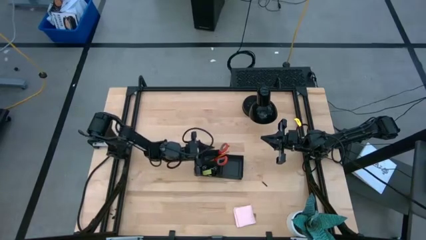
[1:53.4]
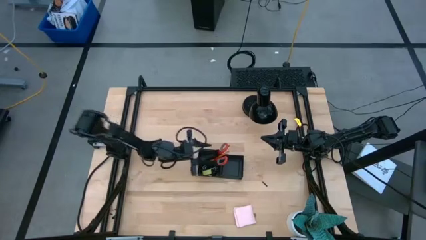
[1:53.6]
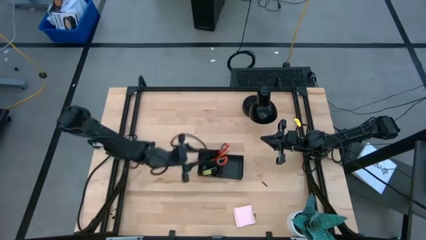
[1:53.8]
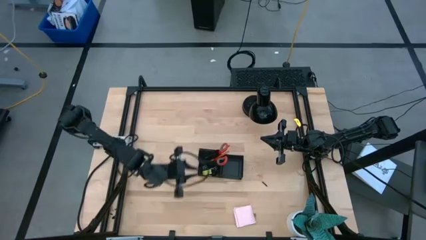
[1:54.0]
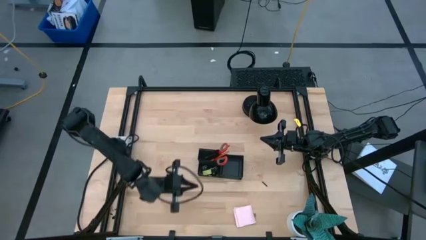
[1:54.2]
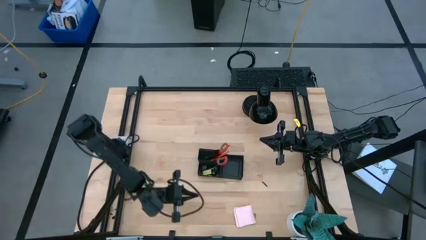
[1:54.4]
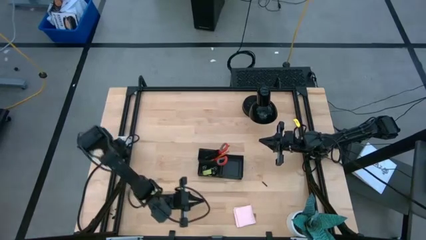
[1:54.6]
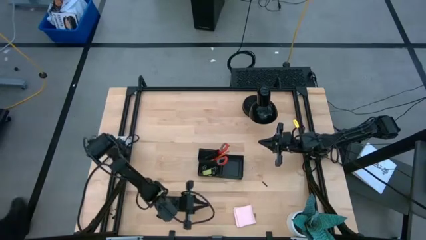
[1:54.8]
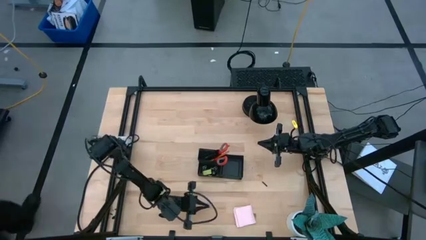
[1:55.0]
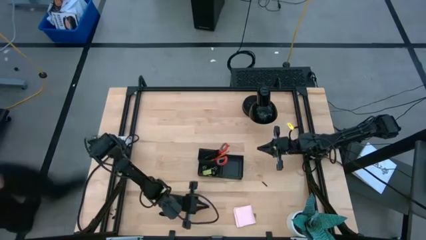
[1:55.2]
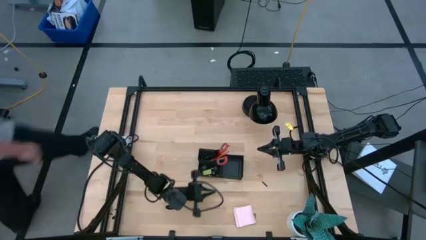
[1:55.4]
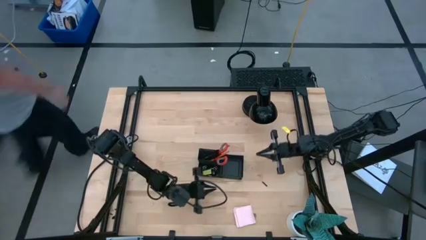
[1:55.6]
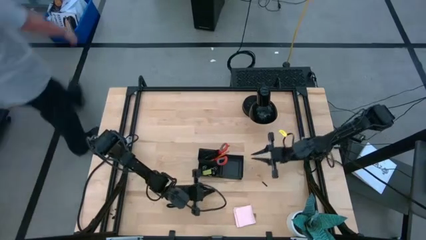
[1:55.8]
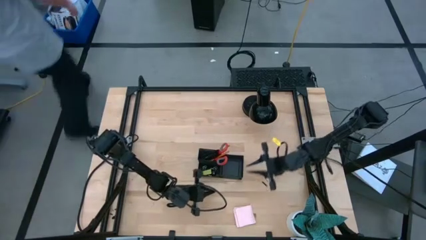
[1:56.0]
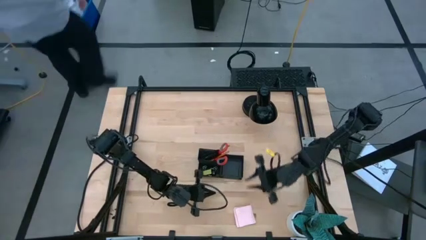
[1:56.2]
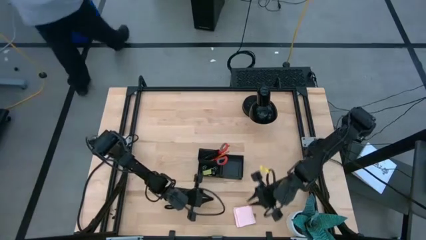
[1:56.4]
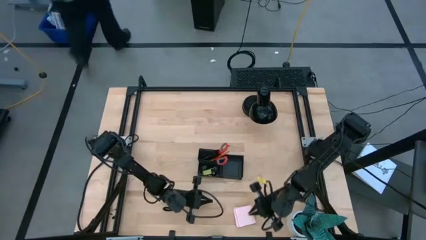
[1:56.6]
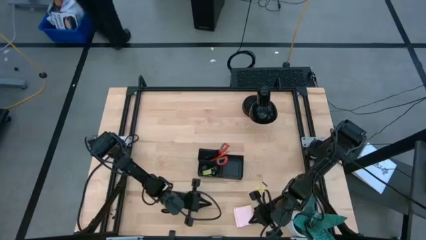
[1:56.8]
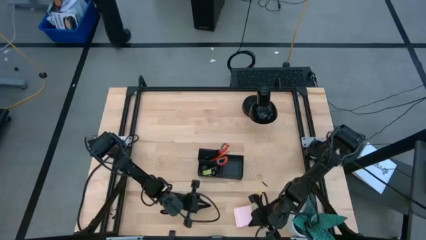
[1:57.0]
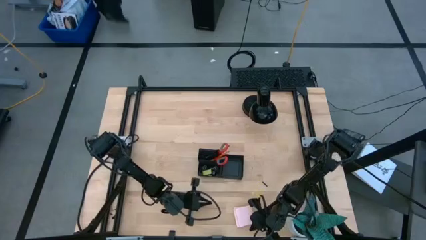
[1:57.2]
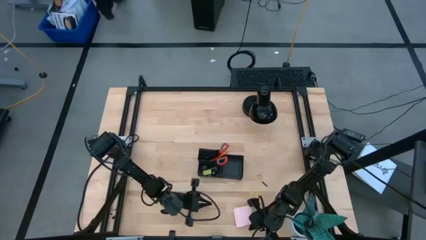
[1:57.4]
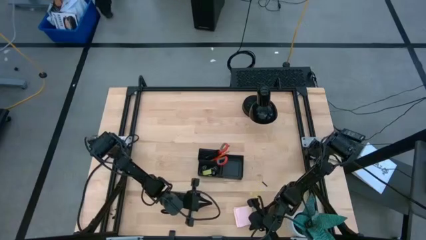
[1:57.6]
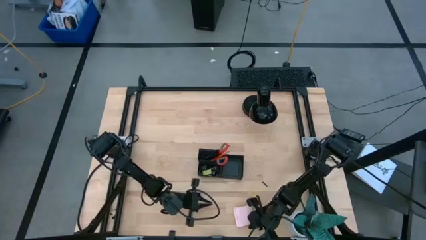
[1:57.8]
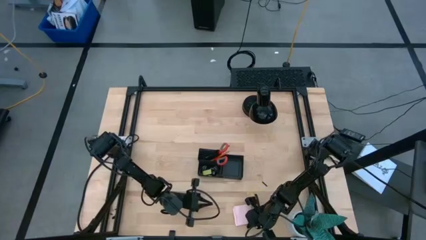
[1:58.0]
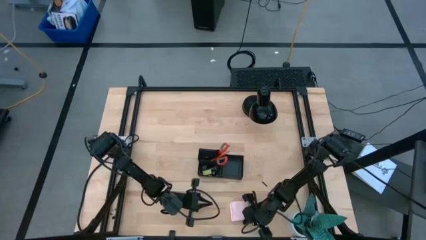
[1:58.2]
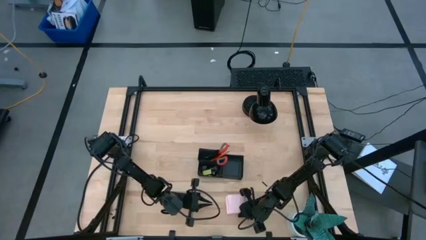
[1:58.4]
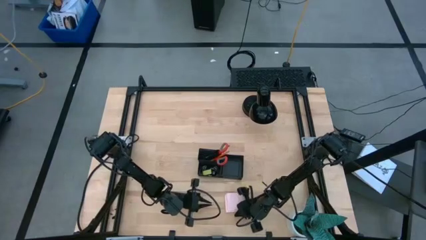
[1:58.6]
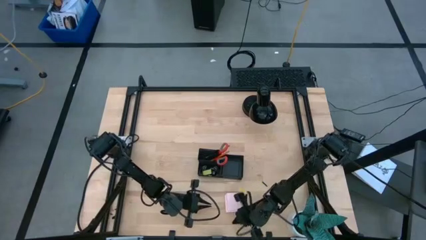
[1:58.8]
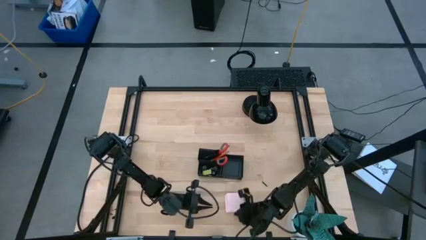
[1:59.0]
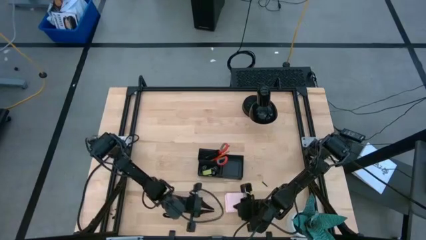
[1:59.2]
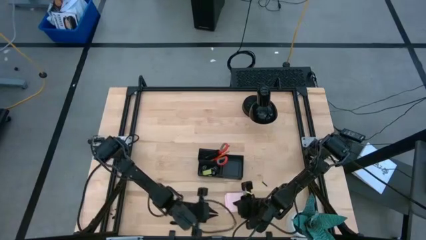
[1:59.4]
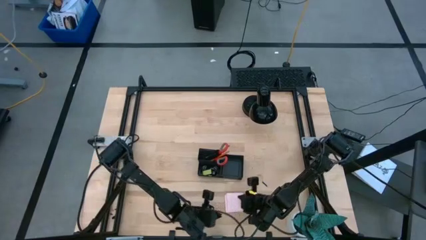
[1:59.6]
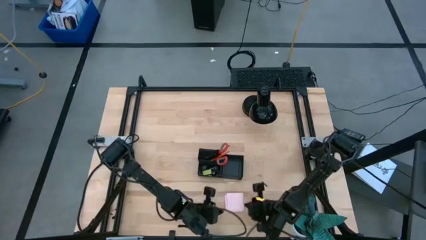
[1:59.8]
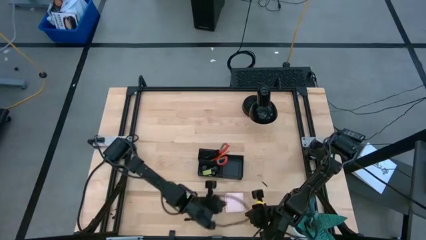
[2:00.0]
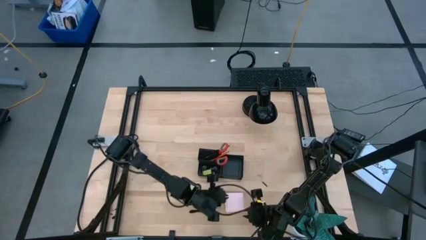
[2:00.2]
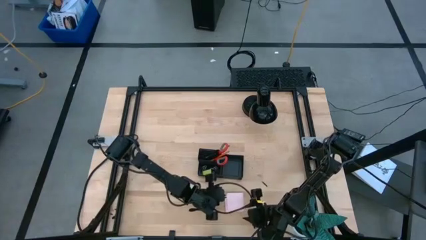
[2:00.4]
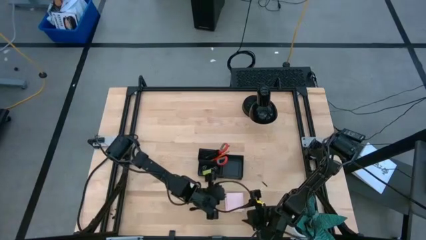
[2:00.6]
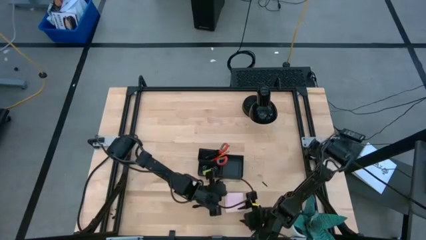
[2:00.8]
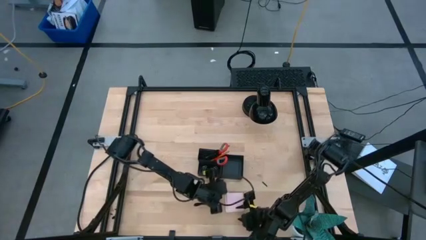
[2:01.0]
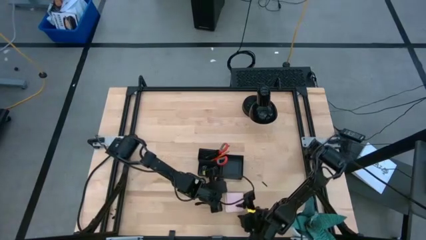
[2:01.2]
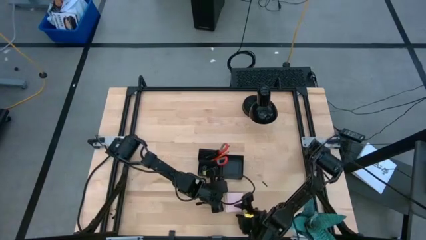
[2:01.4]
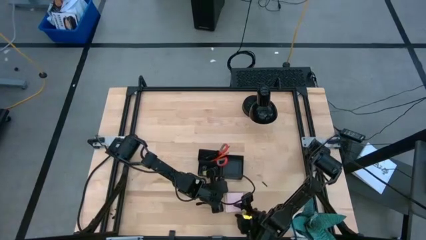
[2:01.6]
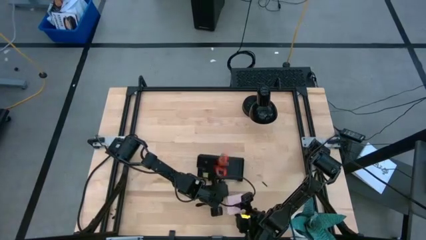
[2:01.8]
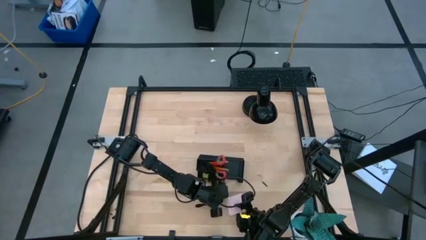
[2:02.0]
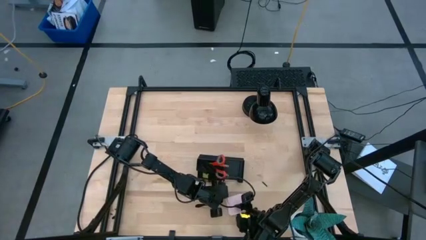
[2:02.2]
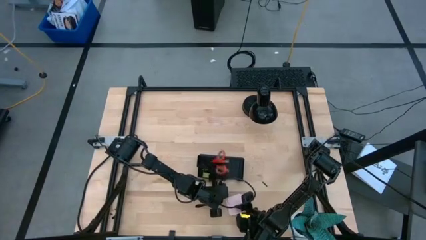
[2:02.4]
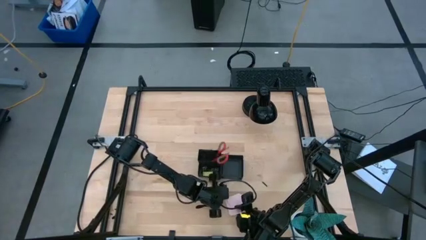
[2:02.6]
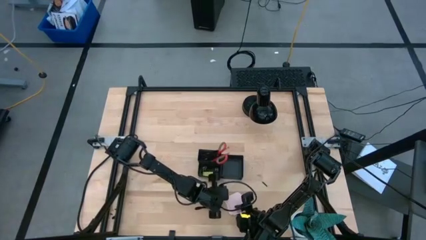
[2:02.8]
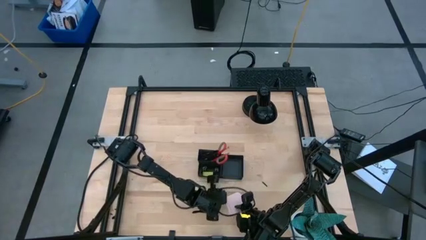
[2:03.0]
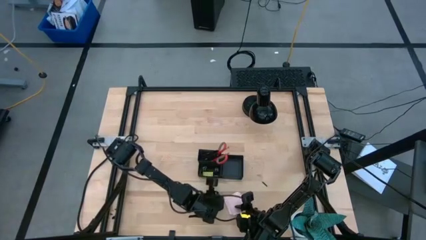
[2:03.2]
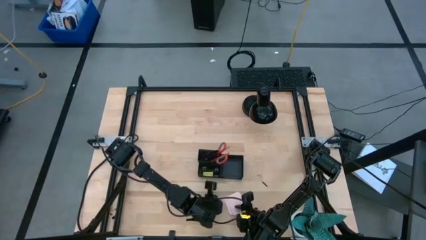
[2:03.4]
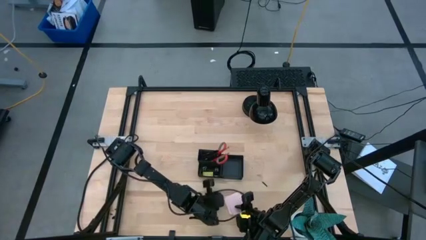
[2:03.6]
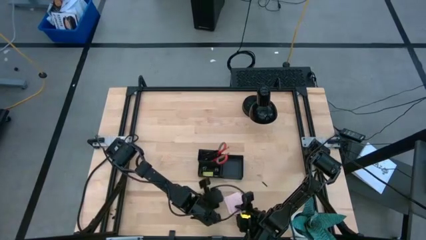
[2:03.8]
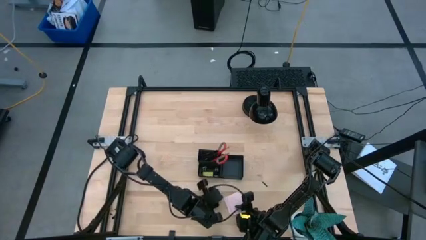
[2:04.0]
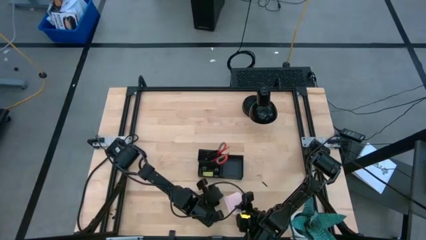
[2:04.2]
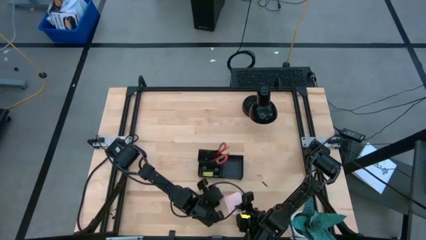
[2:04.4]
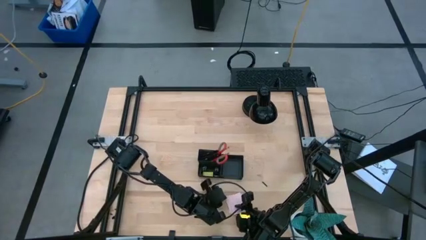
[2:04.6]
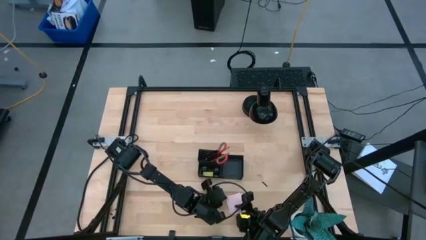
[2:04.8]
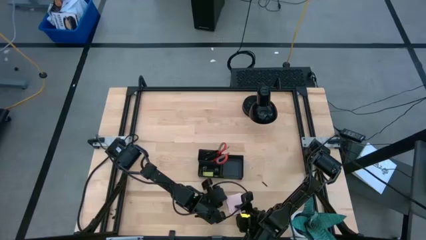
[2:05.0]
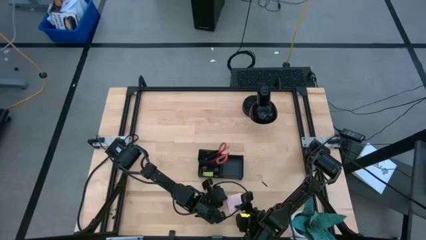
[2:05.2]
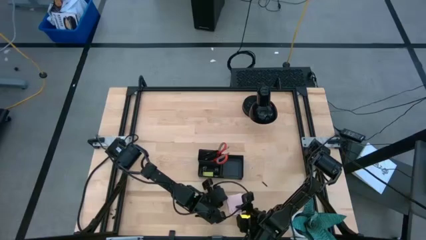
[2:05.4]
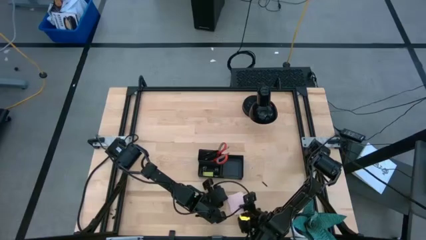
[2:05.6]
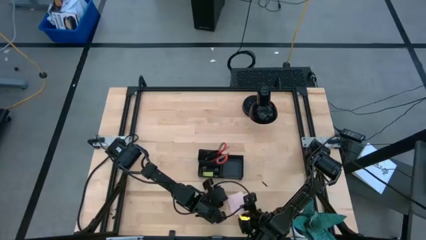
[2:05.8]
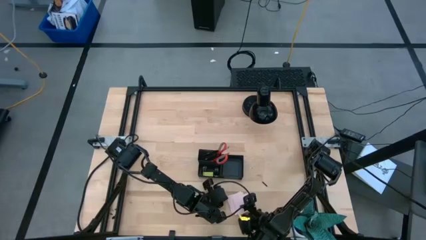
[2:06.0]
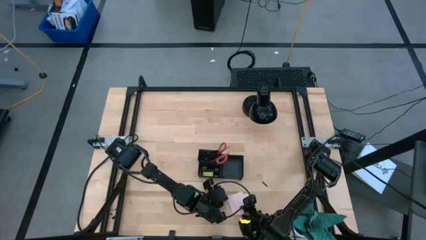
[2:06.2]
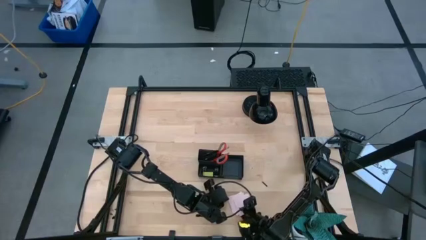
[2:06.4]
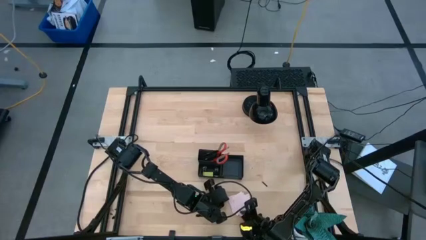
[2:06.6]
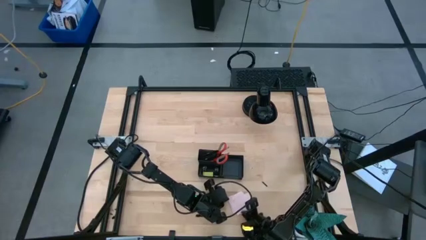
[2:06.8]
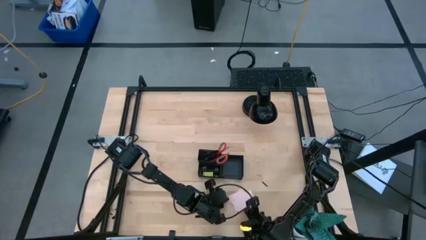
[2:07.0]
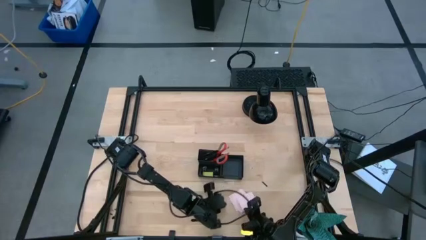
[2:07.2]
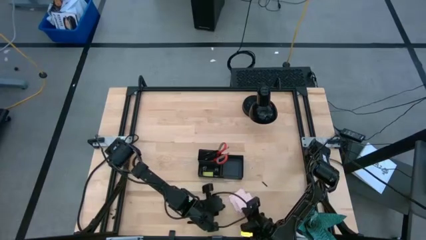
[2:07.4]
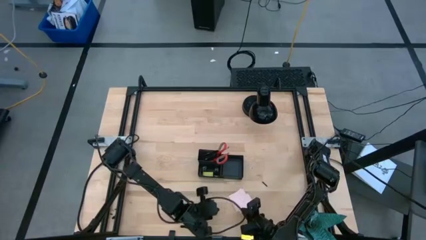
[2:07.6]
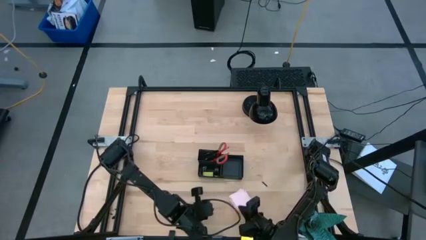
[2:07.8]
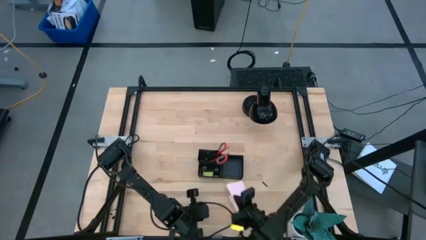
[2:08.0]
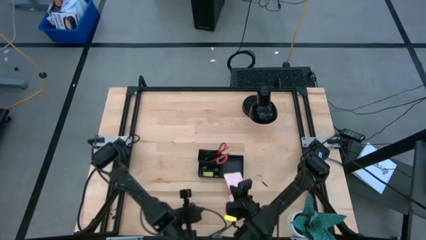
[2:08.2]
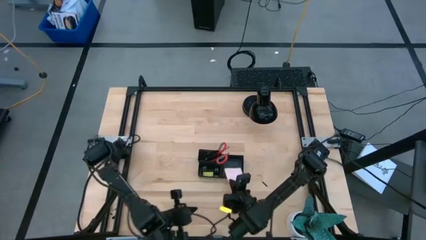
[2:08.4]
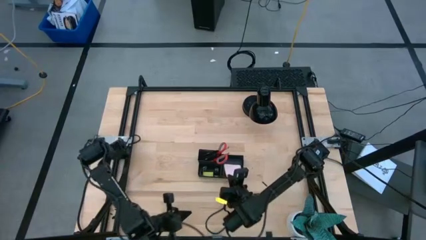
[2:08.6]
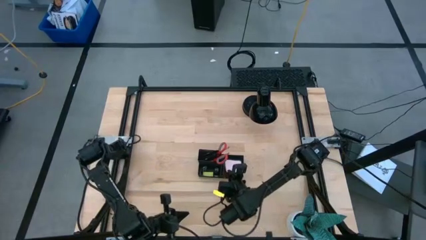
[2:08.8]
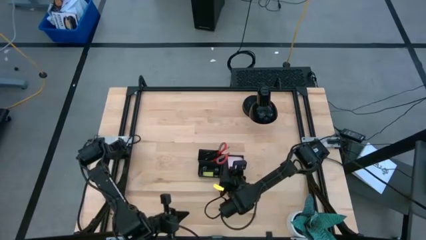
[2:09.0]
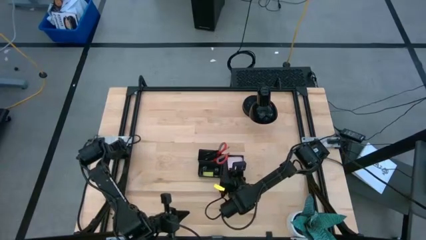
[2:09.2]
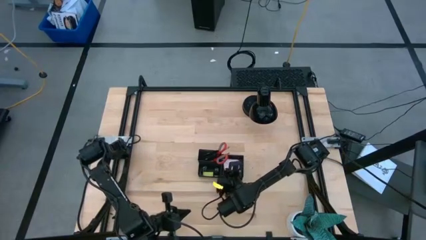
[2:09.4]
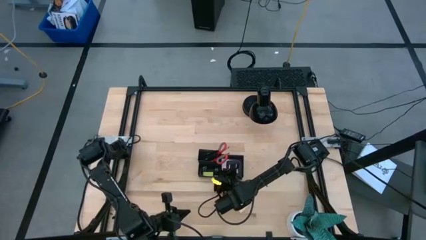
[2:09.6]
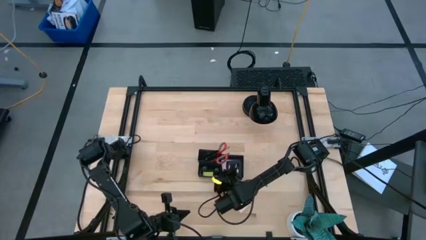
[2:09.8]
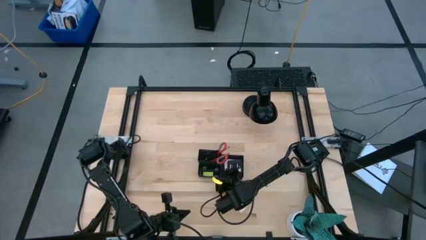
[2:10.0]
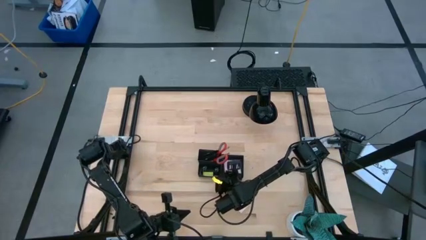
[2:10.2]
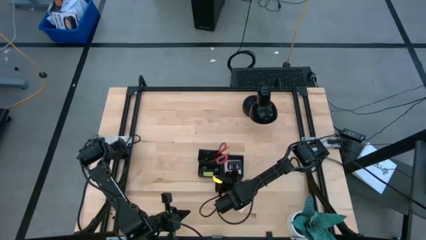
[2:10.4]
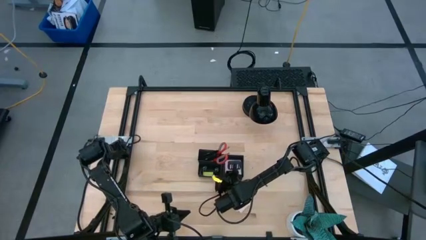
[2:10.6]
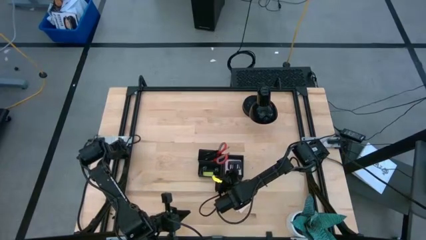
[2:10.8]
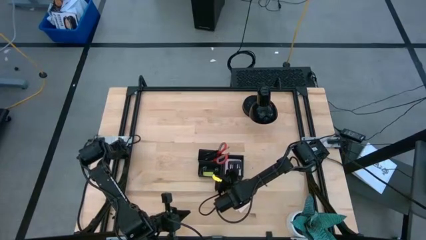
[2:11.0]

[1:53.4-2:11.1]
Task: Pick and place office supplies into organizer
Put the top pink sticky notes into the black desk organizer
